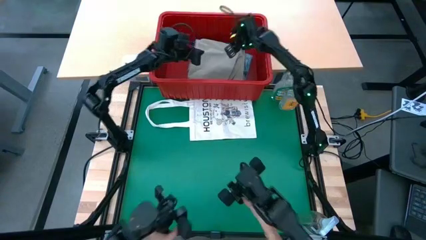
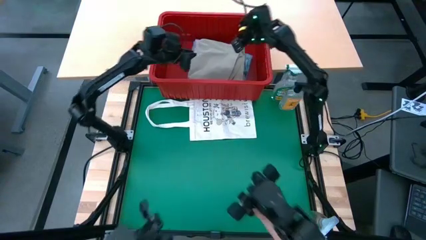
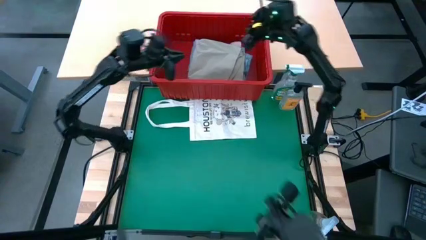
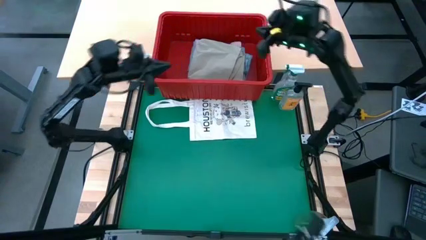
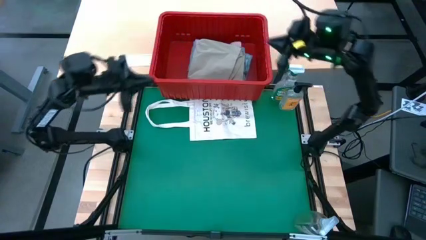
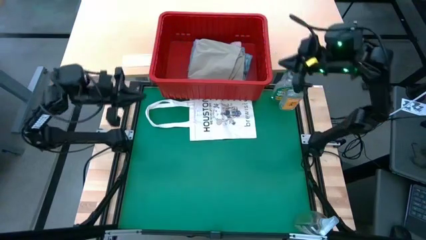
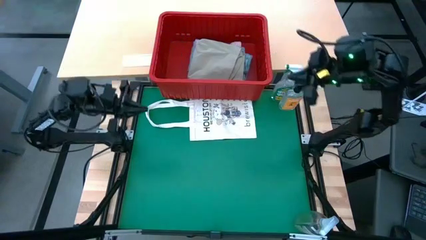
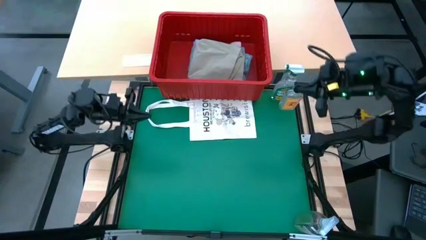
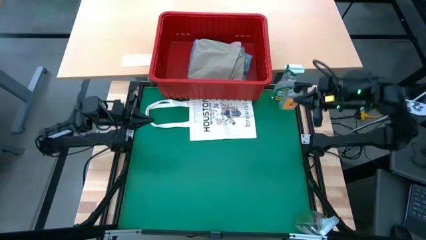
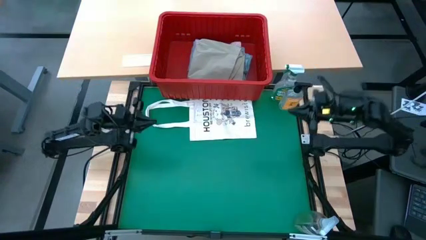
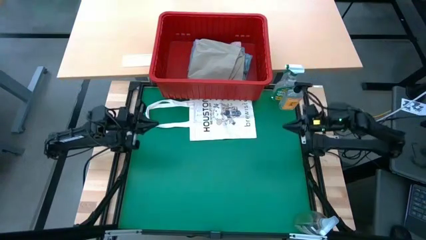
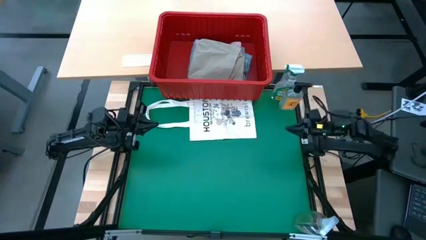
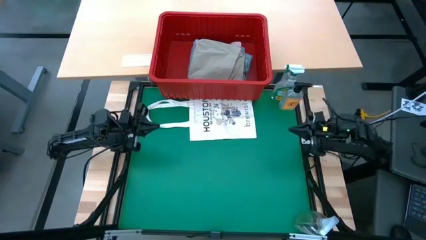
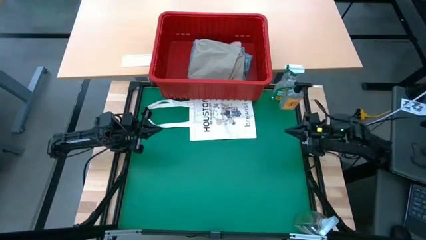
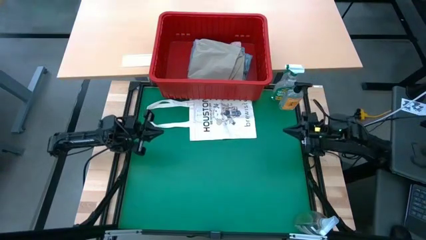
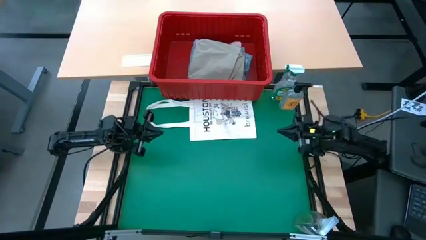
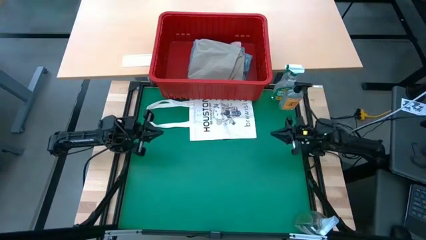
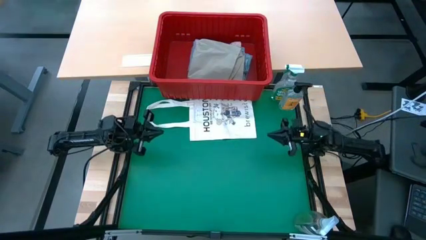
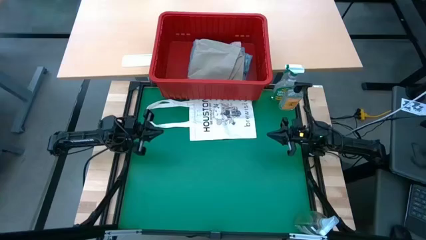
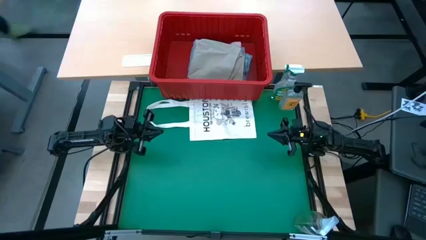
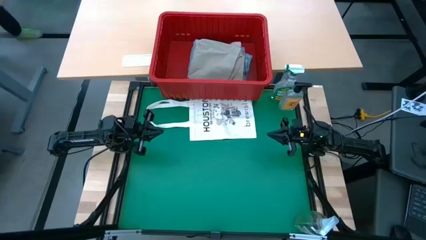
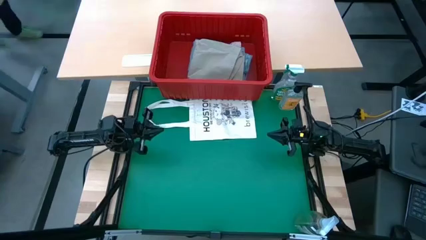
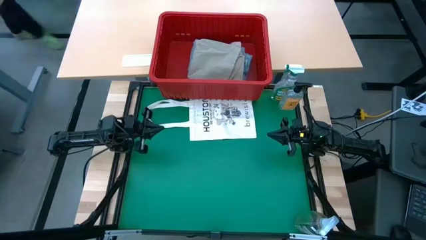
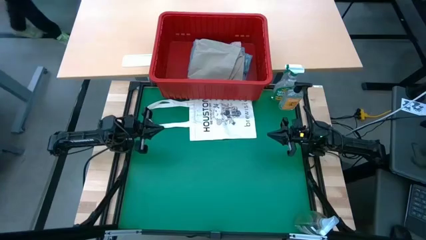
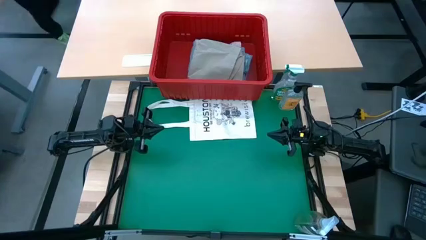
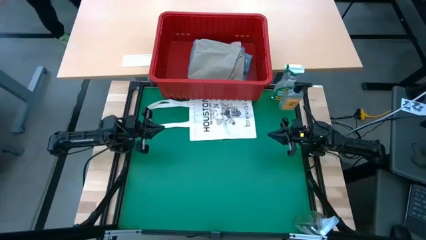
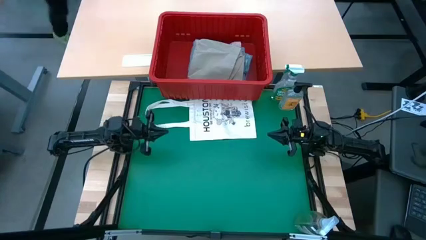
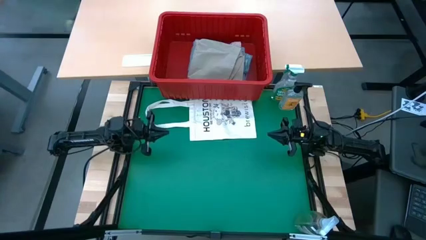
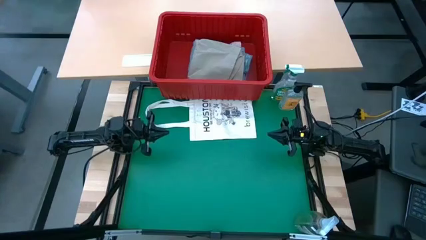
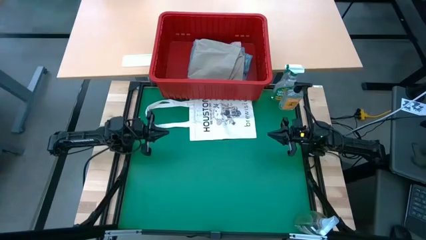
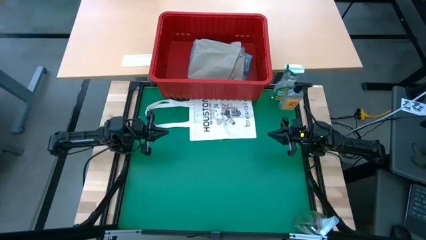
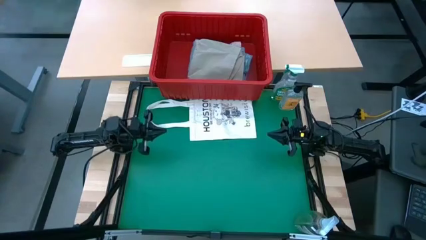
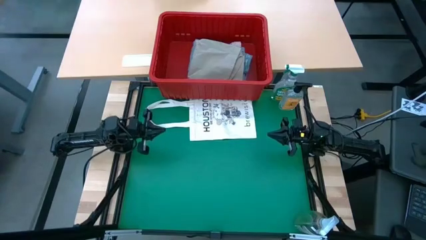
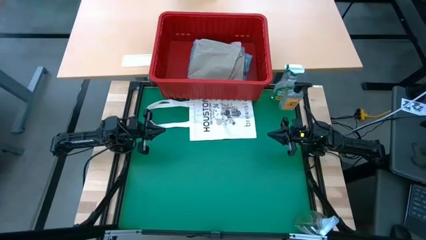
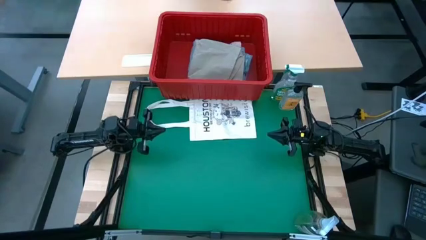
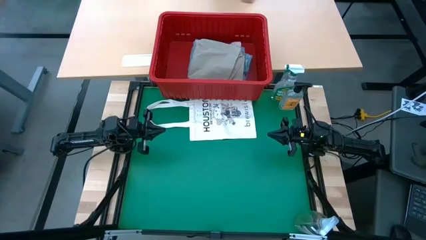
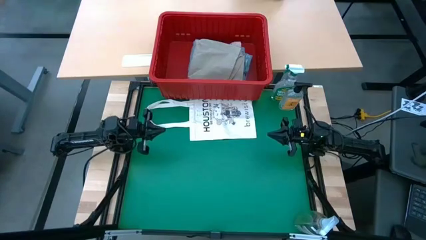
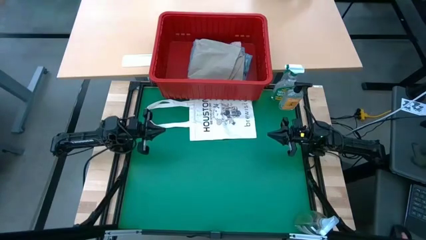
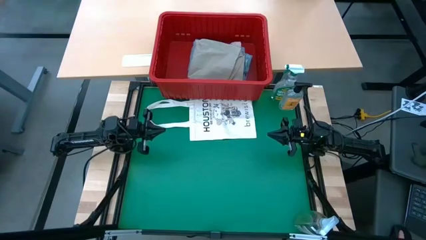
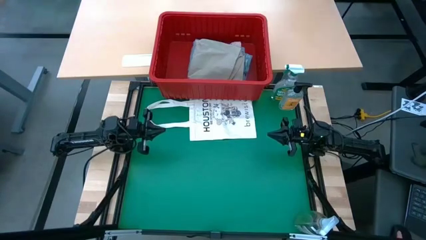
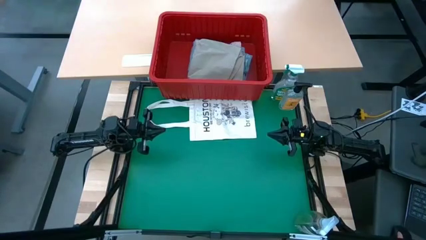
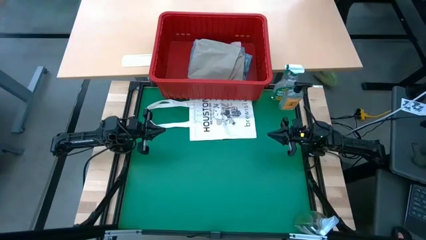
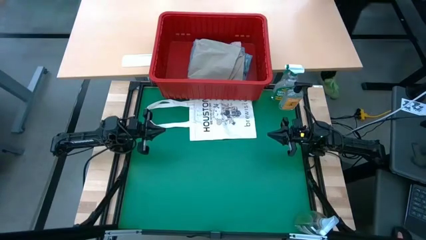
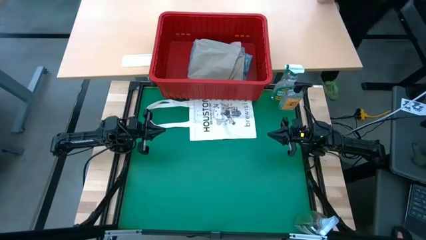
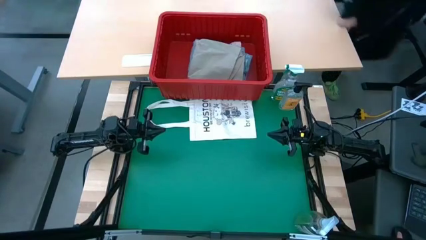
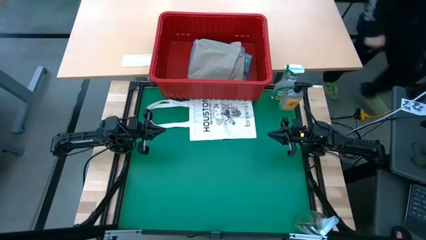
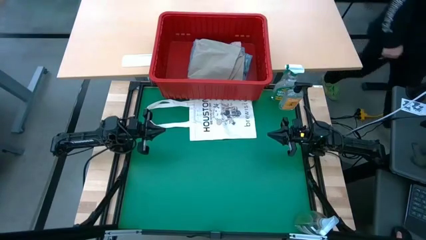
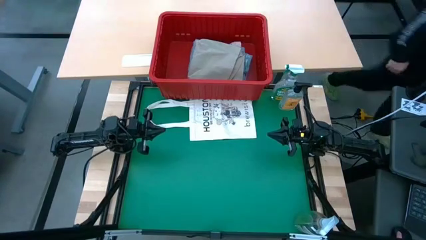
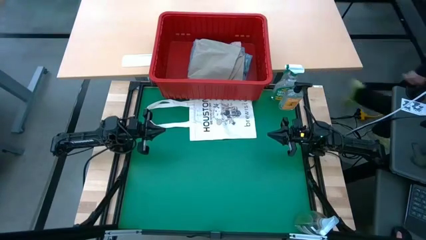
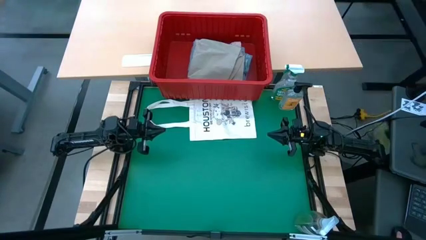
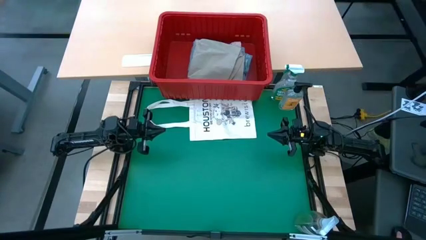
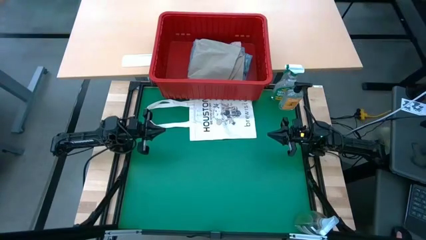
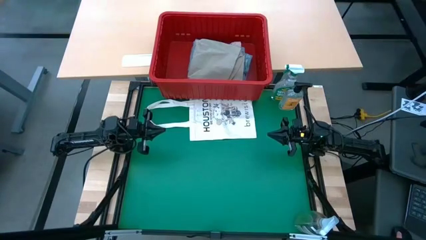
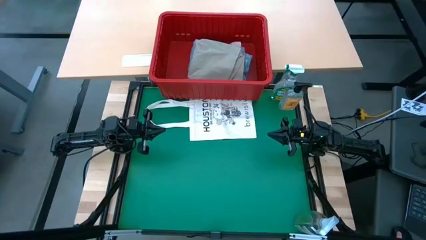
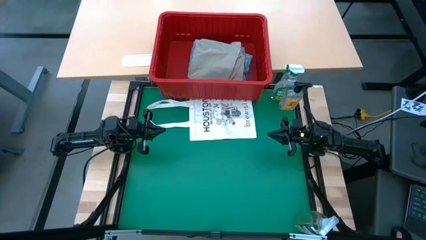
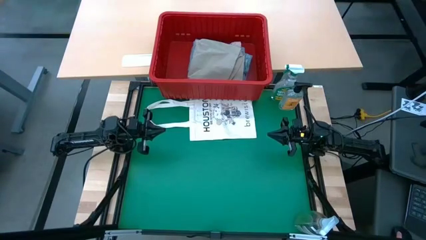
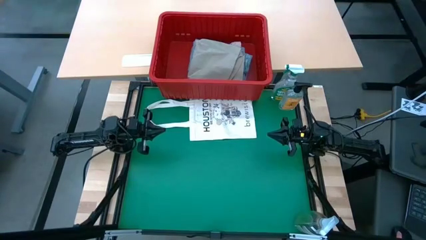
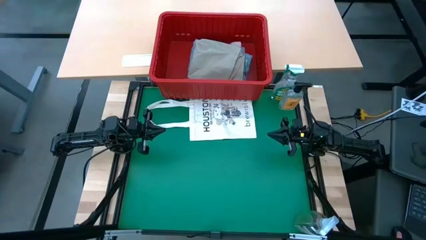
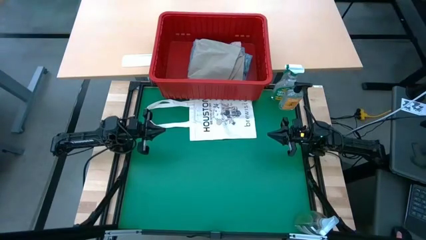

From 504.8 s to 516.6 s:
Task: Fold Laundry from Bin
Return to Home Position
